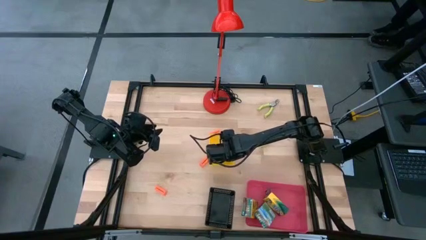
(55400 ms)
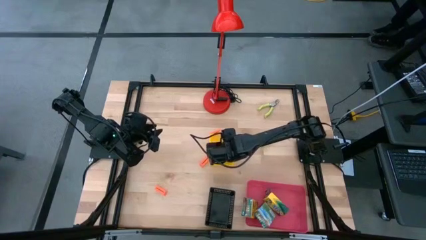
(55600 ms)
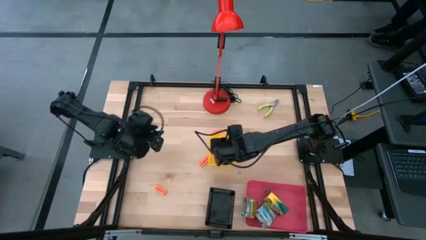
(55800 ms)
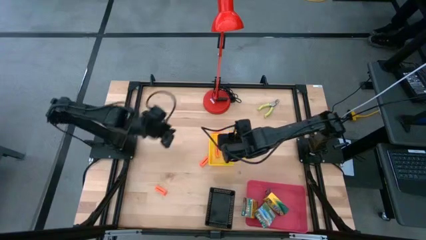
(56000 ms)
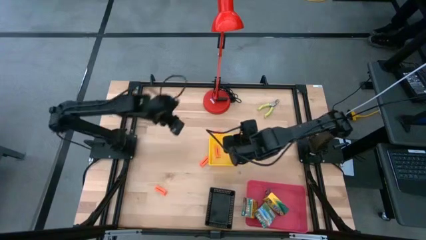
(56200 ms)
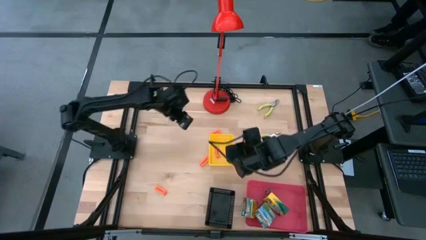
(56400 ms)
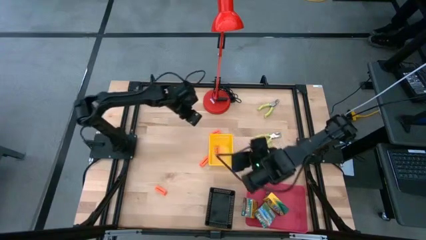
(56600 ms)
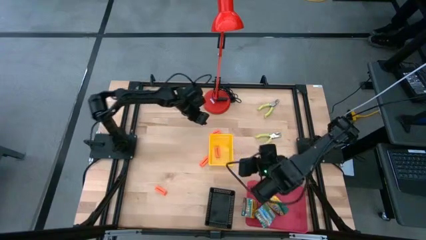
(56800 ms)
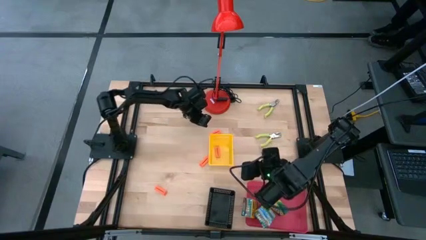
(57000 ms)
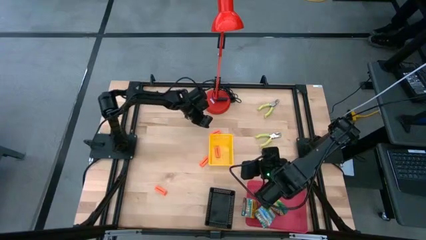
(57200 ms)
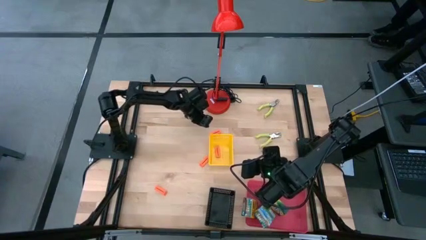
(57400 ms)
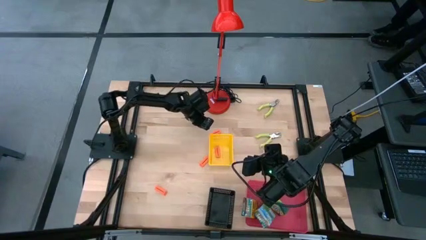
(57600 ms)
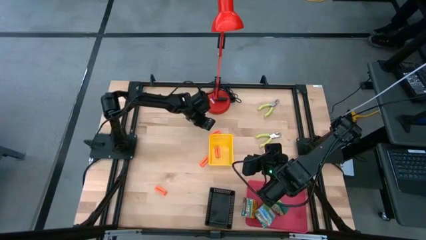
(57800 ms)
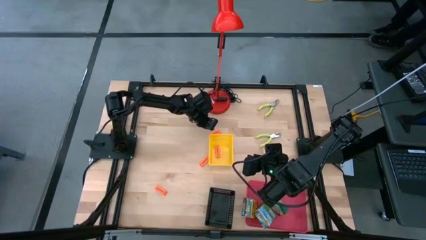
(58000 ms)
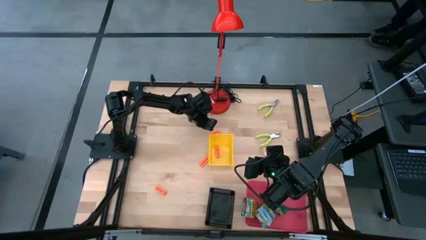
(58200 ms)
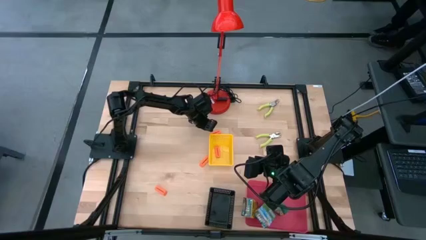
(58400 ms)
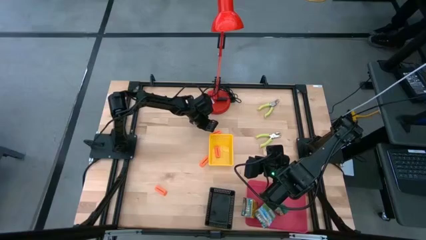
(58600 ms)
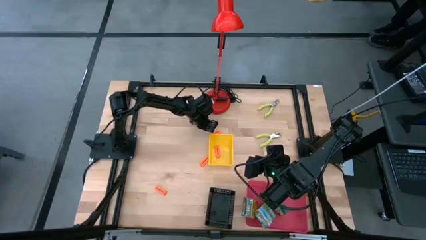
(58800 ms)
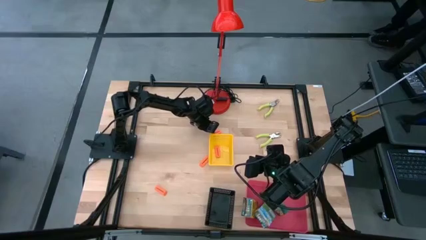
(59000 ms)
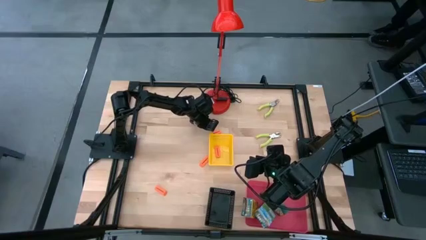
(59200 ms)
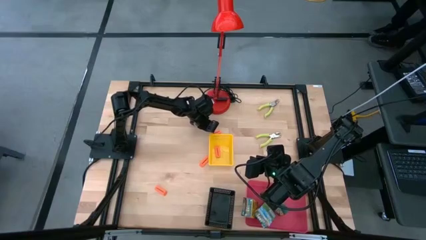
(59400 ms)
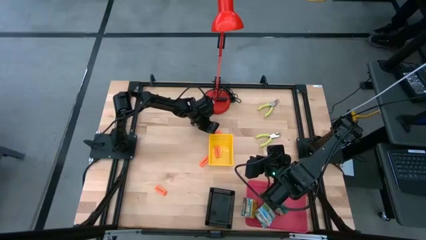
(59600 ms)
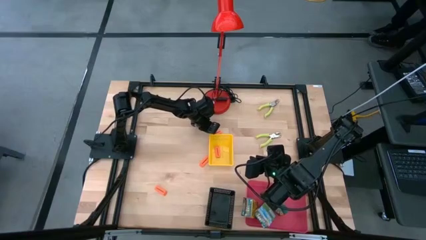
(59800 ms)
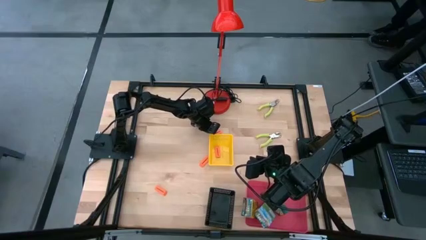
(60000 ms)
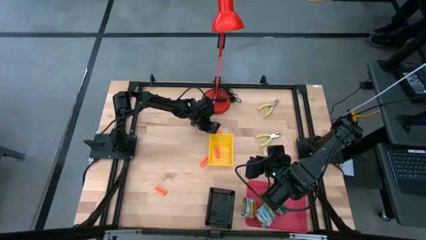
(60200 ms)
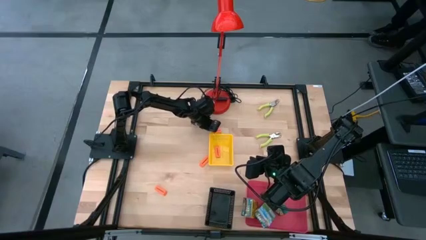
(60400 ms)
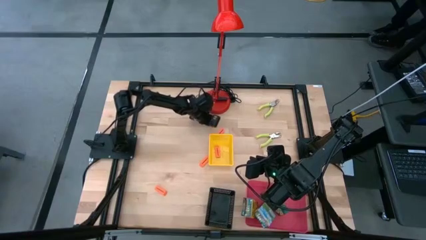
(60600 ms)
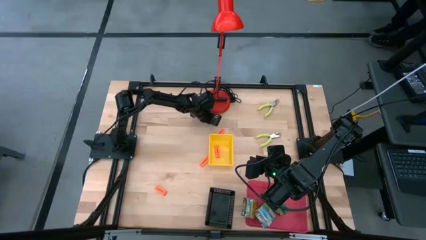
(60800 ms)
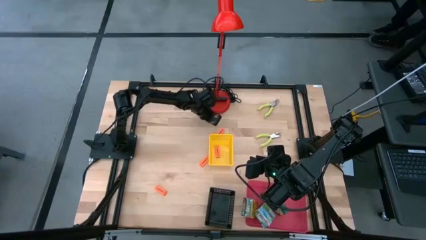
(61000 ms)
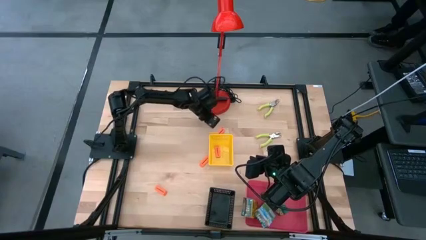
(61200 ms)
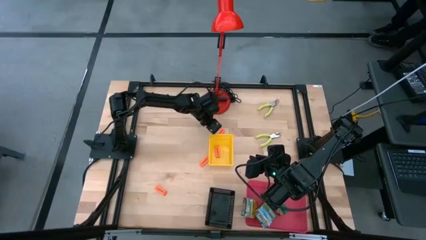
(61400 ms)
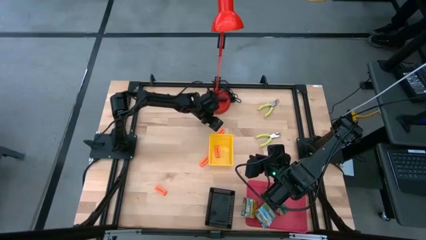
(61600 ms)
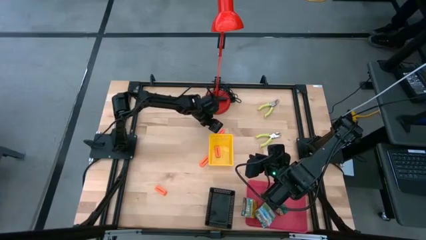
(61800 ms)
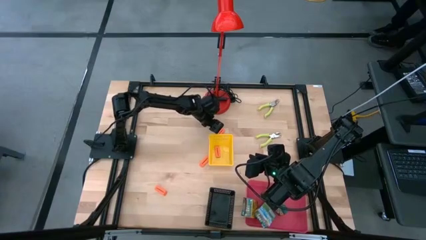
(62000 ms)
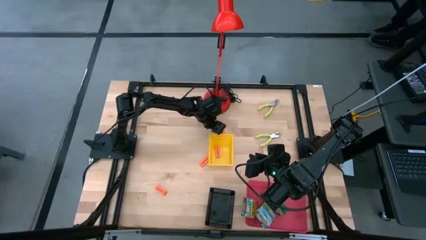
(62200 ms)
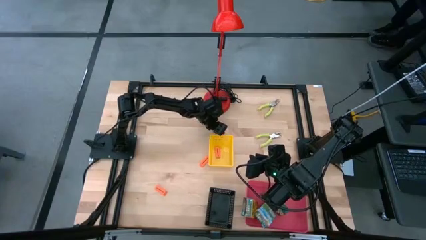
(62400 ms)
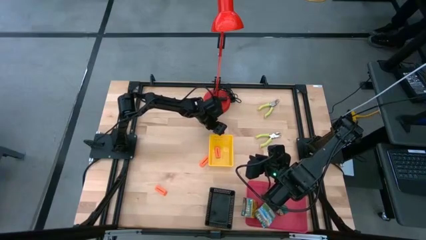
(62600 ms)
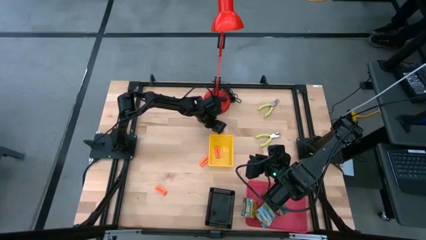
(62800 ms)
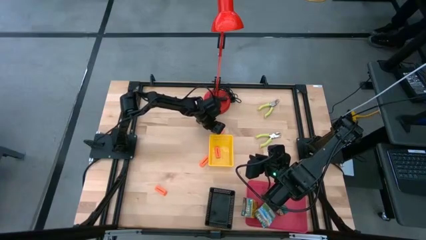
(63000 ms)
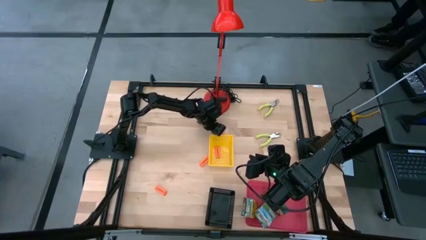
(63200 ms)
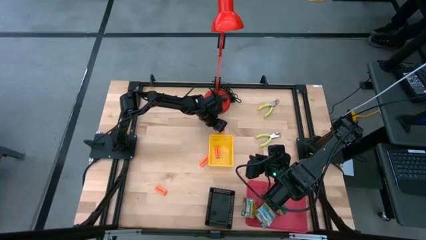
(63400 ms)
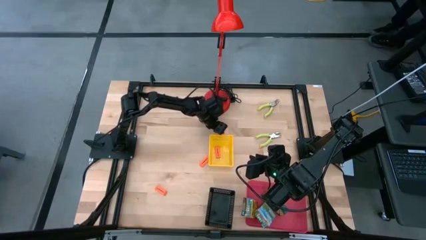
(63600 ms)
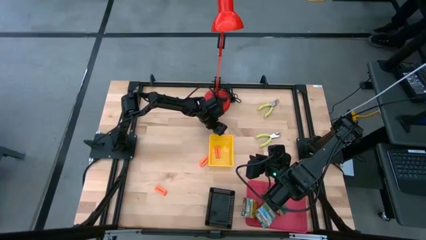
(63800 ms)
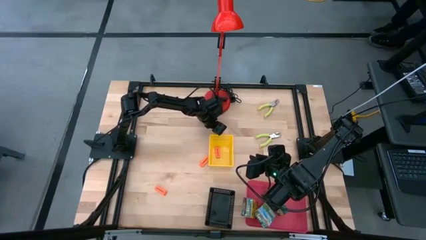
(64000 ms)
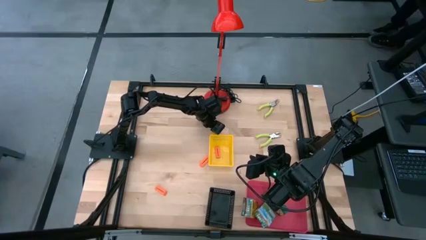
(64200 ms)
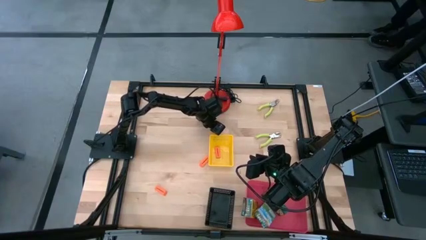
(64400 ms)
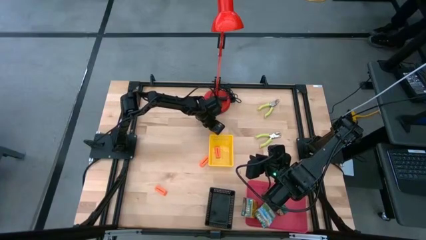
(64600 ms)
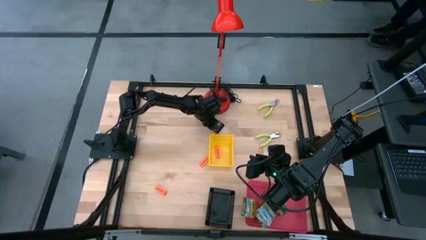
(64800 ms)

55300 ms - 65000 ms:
Task: Pick & Place School Supplies
Put the orange eraser into the yellow bin

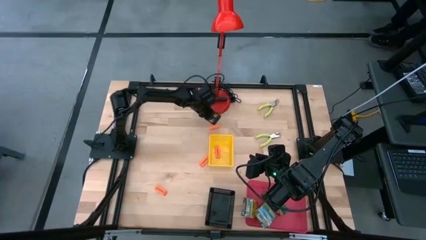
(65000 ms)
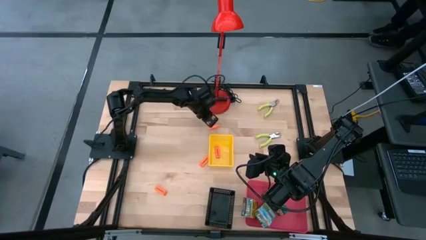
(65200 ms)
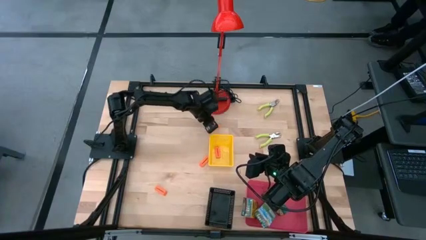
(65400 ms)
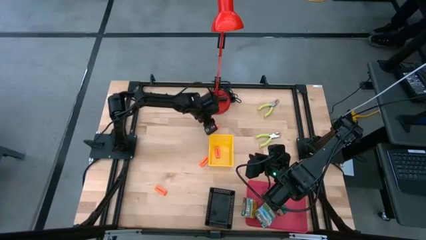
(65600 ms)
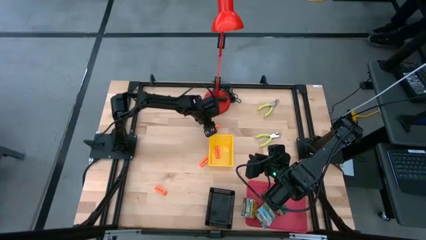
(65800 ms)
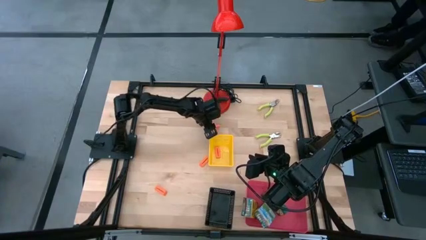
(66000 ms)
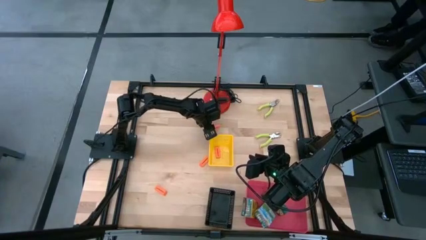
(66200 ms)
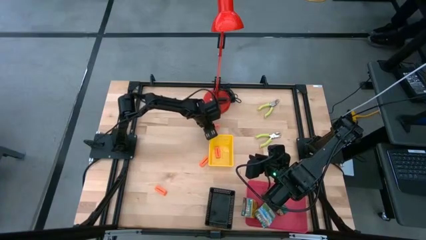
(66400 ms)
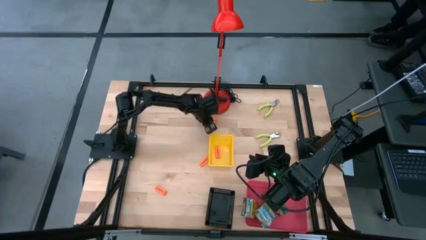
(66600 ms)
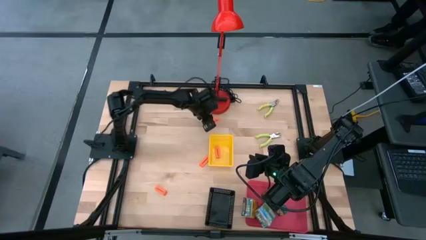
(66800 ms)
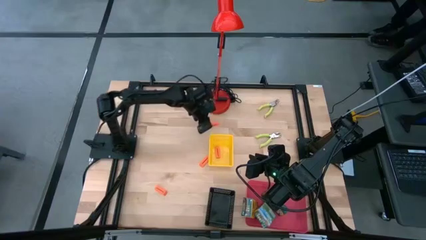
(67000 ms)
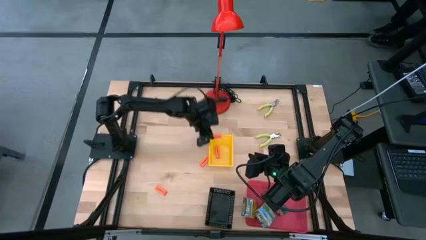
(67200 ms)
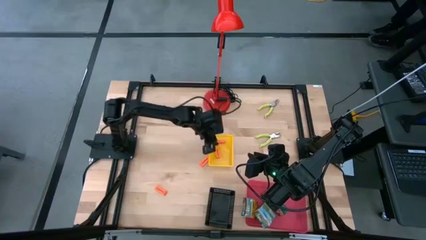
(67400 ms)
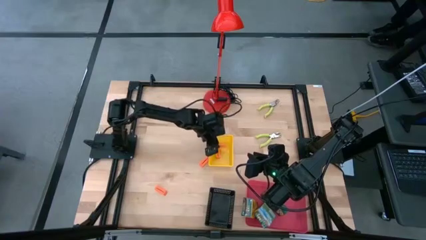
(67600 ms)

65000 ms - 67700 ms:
Put the orange eraser into the yellow bin

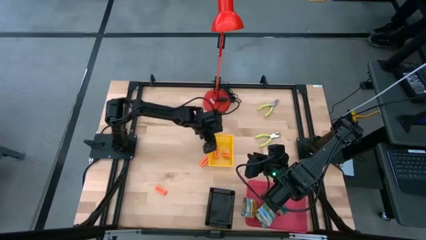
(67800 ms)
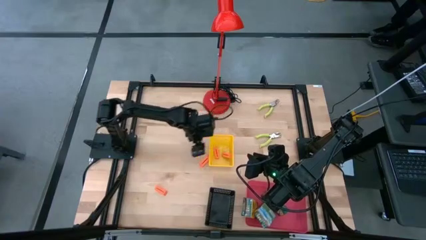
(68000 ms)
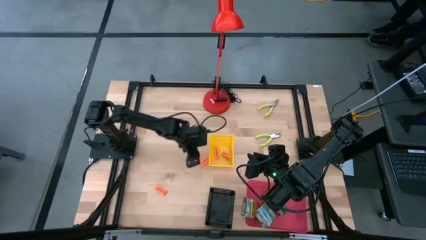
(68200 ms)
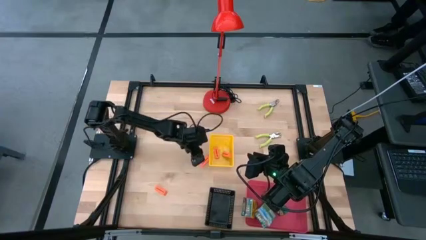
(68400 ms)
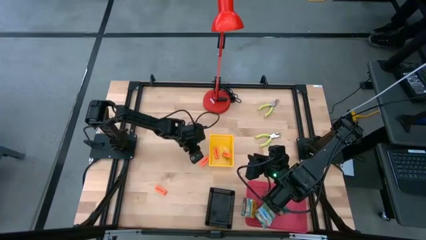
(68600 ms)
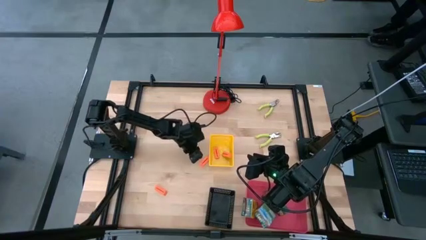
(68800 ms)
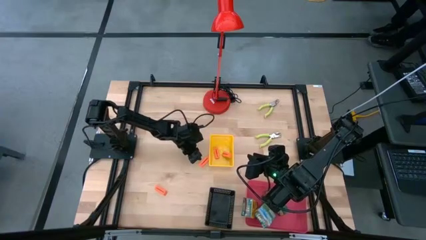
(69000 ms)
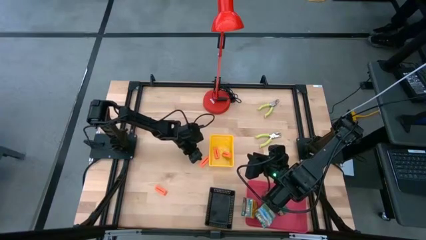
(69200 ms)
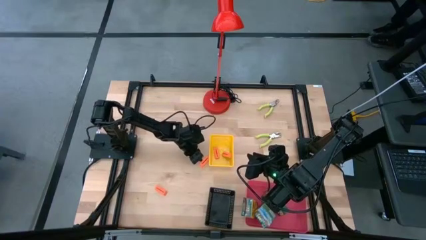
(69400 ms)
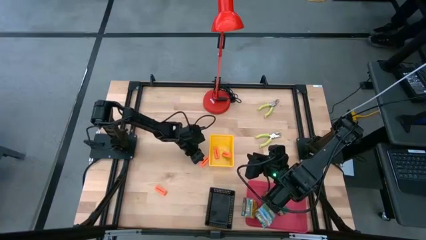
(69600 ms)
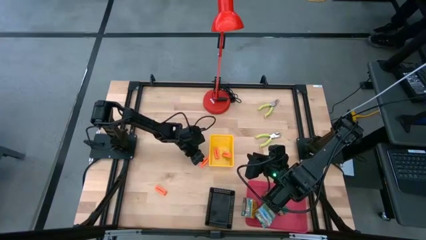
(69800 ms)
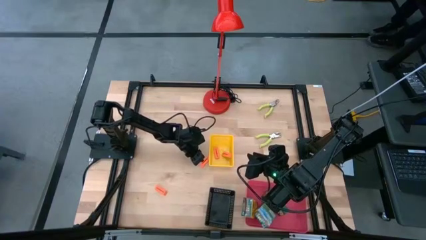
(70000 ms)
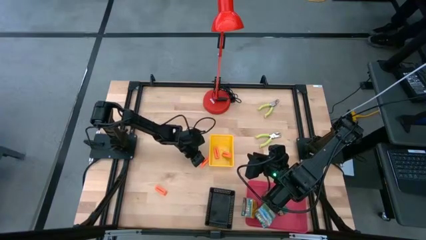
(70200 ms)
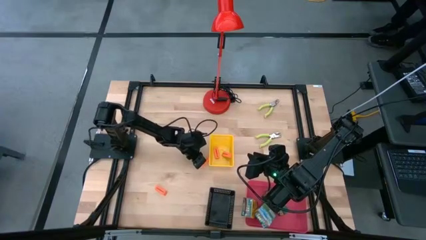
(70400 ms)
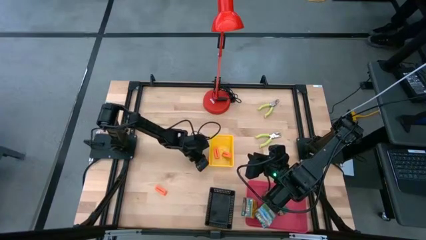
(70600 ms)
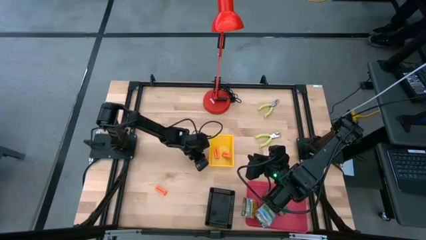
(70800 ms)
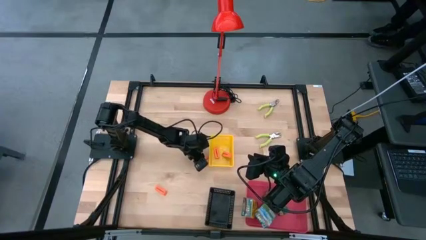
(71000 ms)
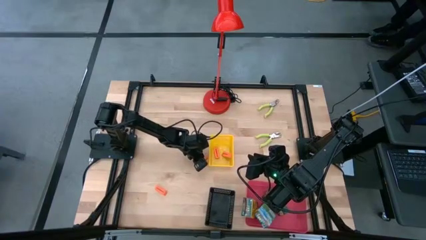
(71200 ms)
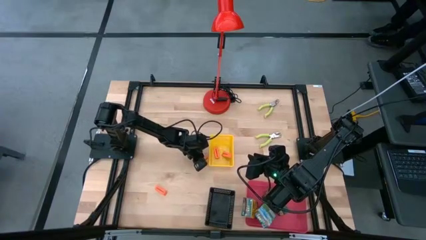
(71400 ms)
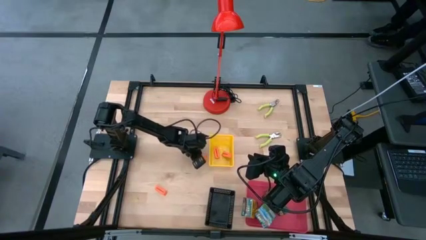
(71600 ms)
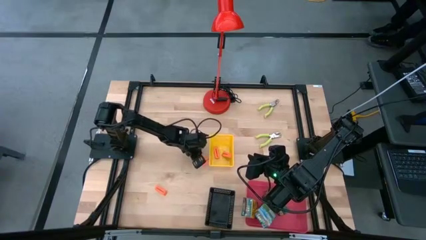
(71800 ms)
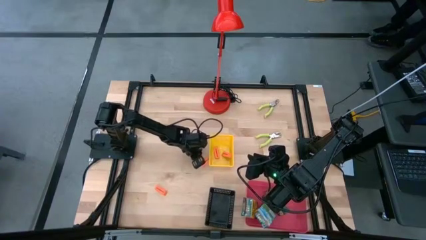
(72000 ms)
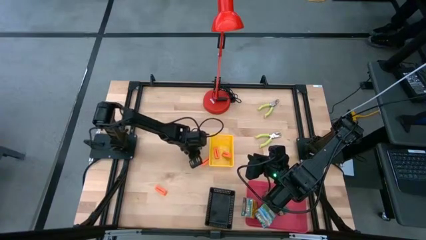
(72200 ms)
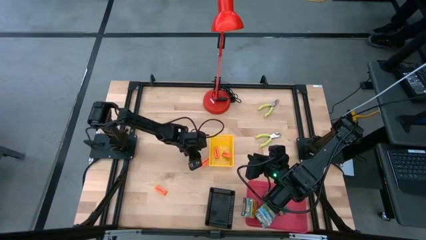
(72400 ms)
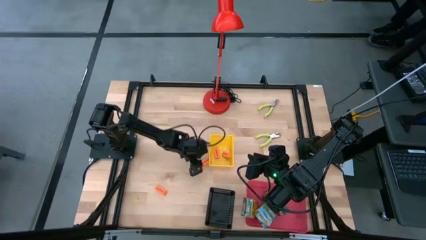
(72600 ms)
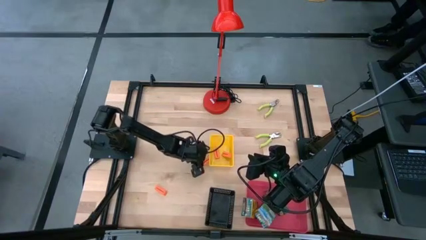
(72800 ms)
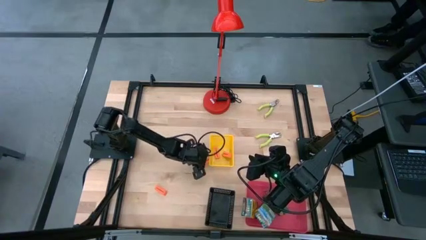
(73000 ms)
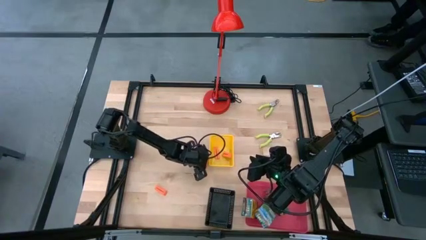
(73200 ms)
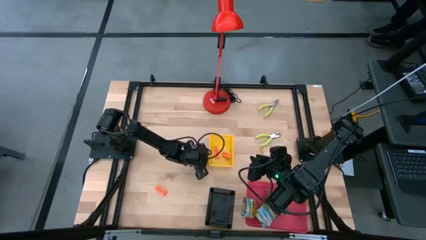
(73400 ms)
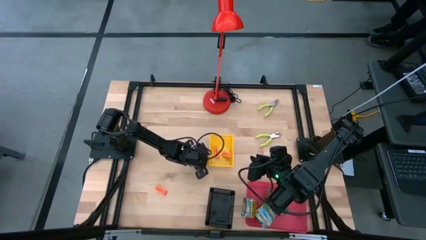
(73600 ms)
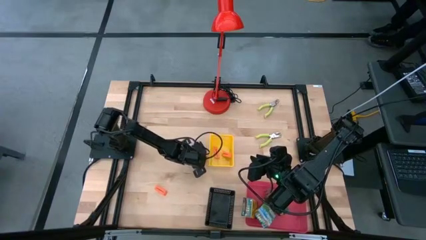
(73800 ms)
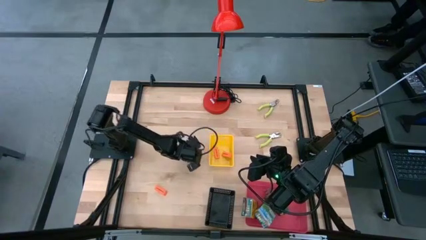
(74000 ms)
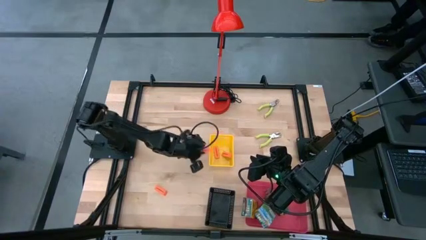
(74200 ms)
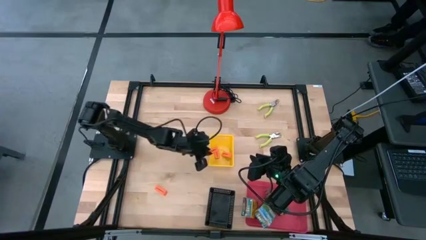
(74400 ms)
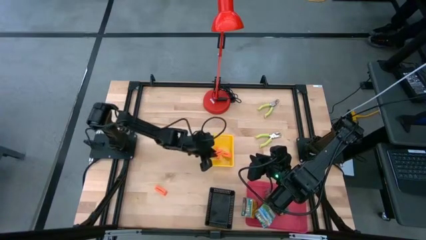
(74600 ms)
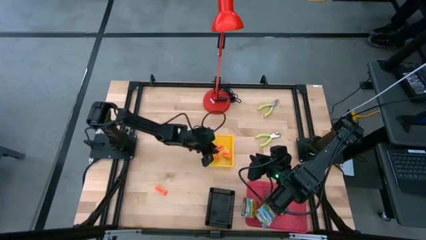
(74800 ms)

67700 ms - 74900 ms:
Put the orange eraser into the yellow bin
